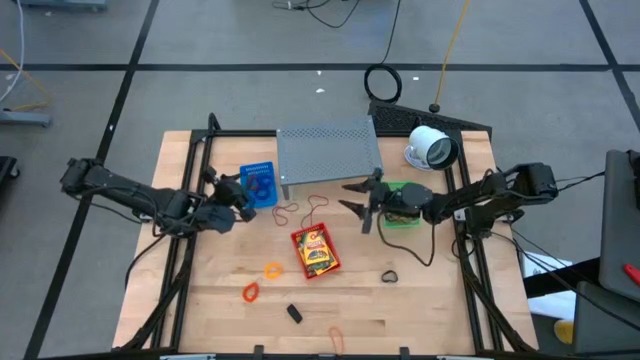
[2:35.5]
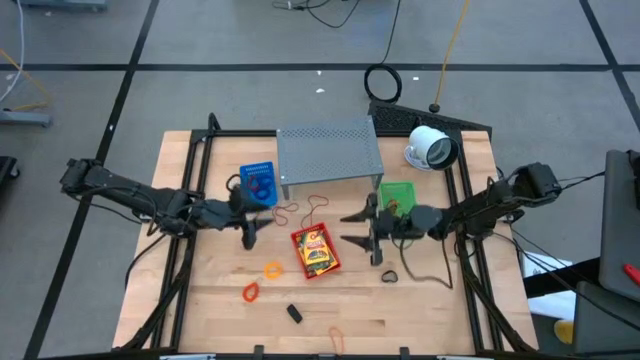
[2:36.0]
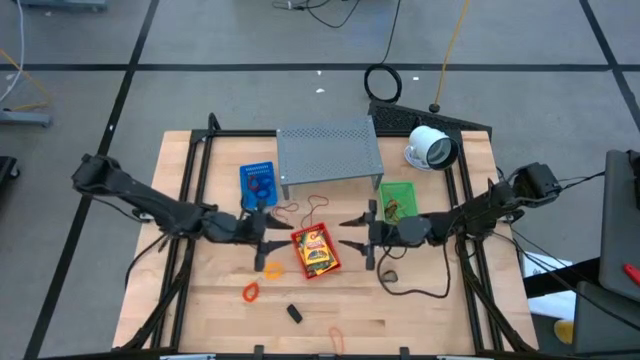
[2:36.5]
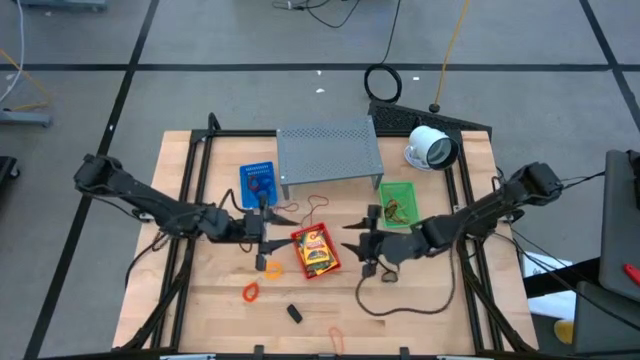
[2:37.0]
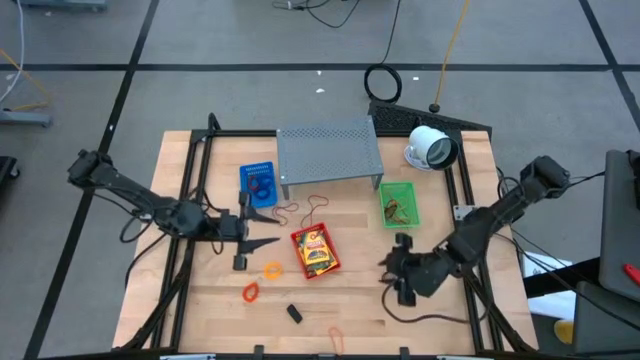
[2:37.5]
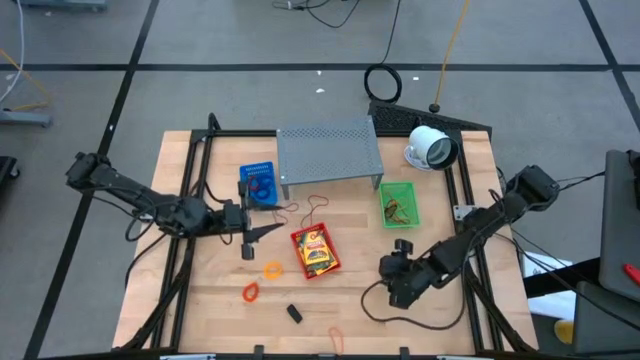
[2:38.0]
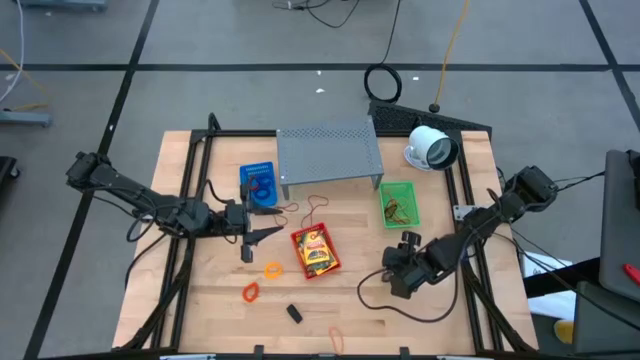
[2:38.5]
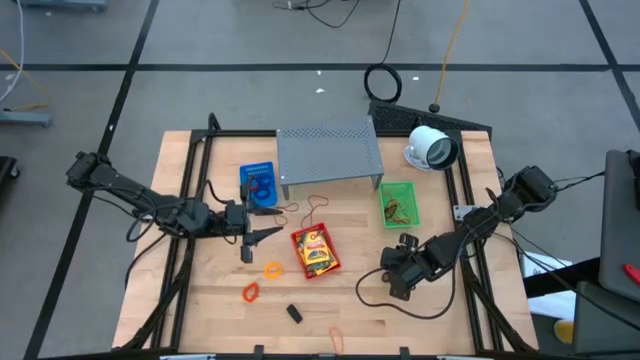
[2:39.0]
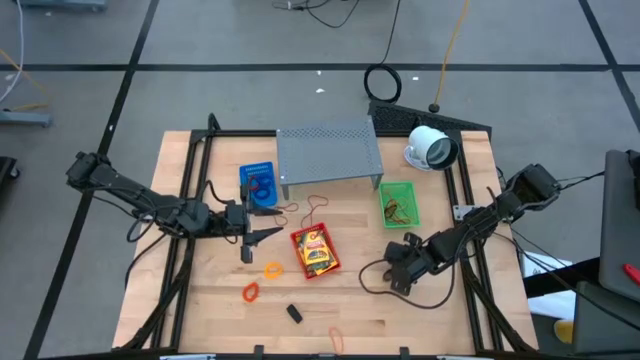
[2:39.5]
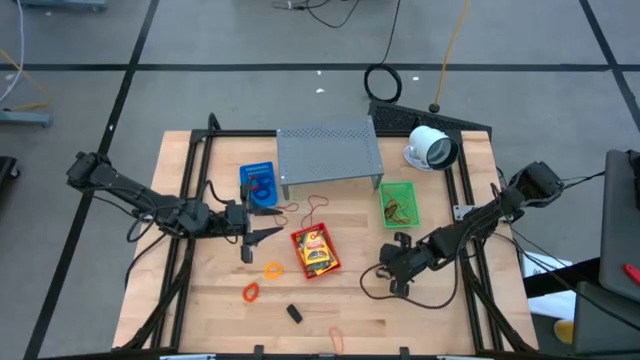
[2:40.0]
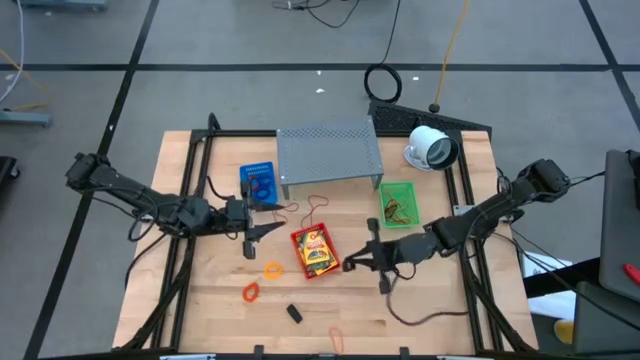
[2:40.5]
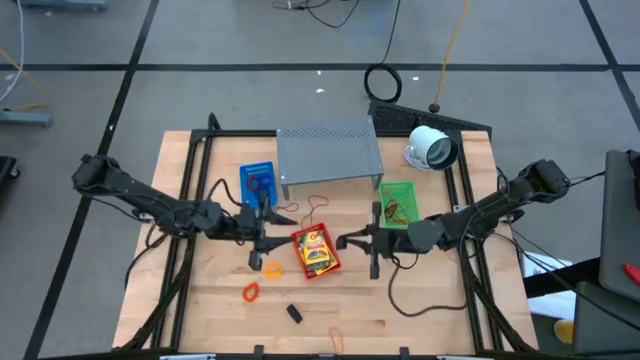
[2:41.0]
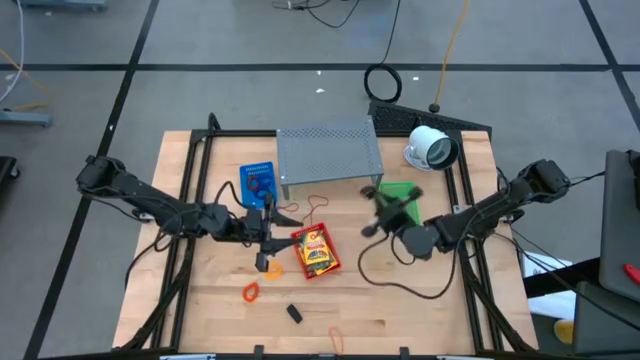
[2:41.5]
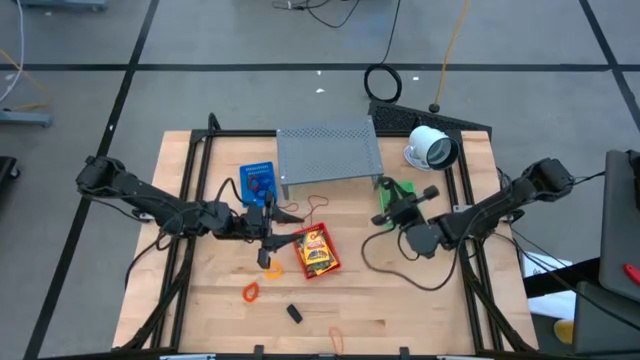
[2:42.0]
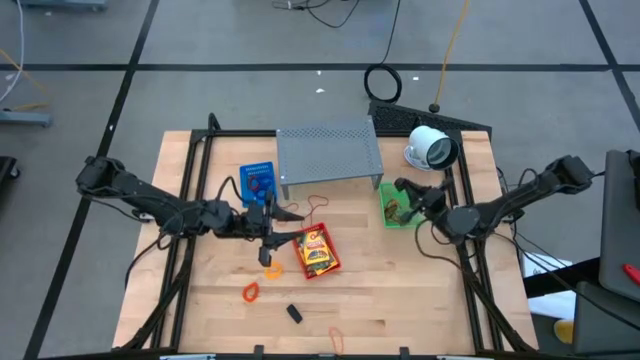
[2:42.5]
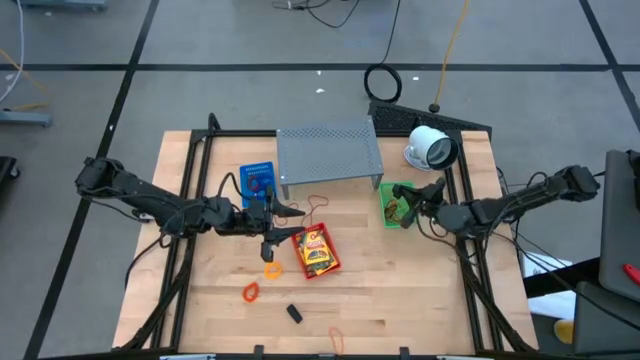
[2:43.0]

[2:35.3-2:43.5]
Task: Pick & Place Office Desk Supplies
Put the right black rubber band into the green bin

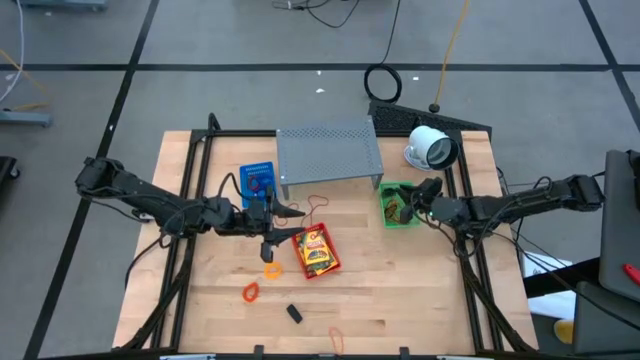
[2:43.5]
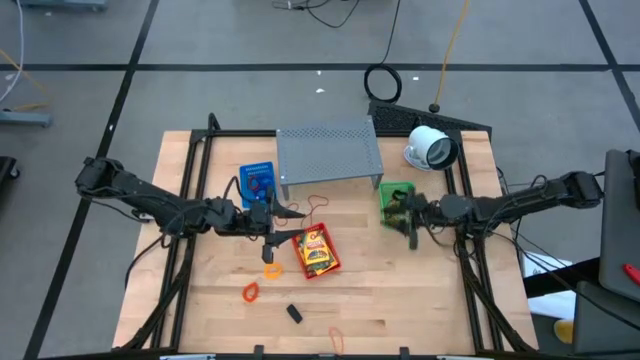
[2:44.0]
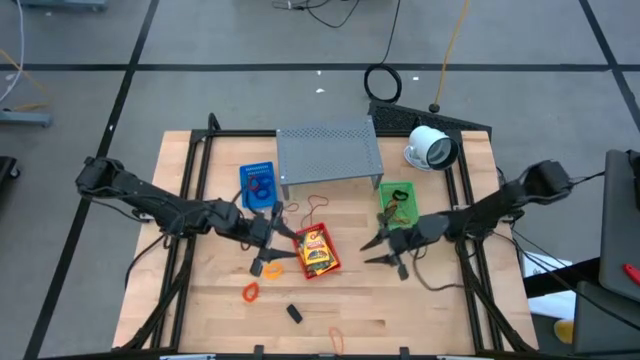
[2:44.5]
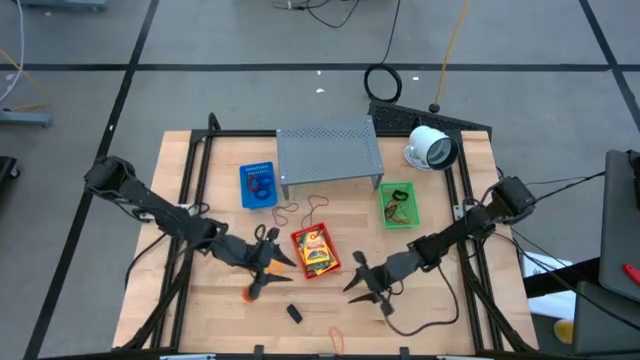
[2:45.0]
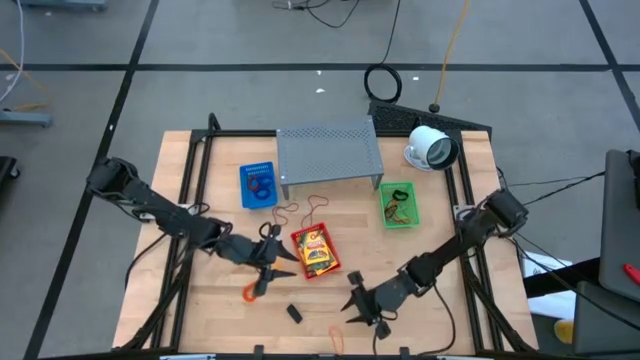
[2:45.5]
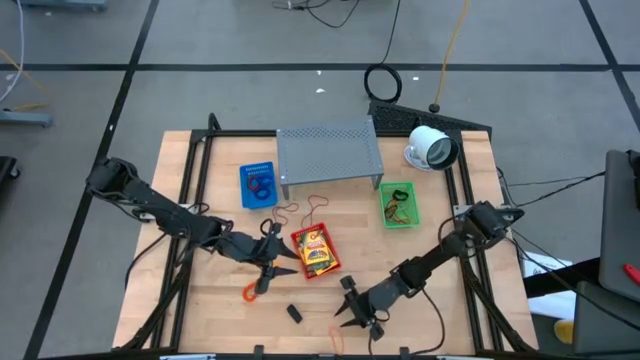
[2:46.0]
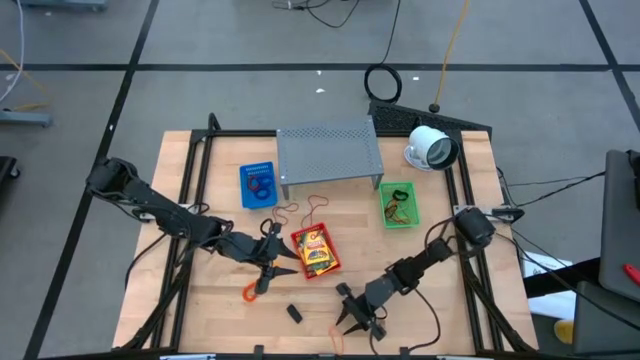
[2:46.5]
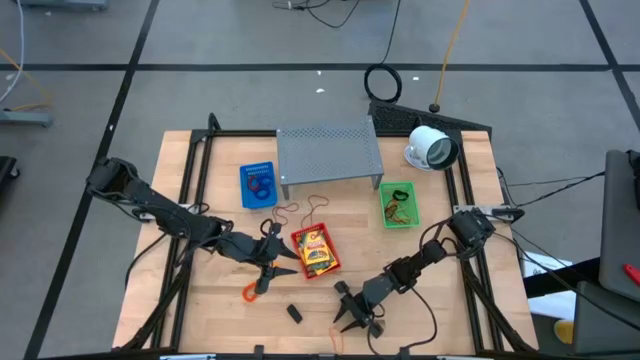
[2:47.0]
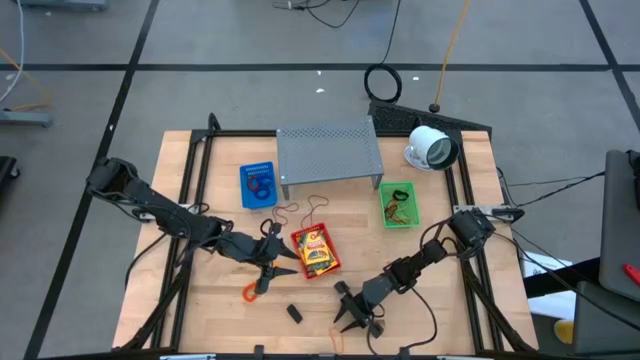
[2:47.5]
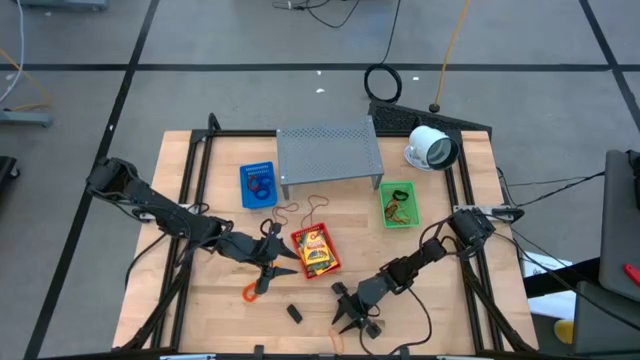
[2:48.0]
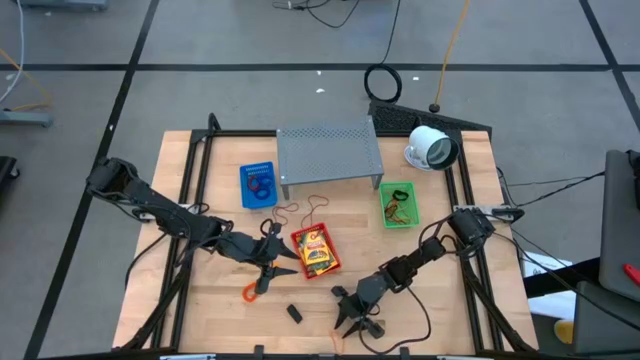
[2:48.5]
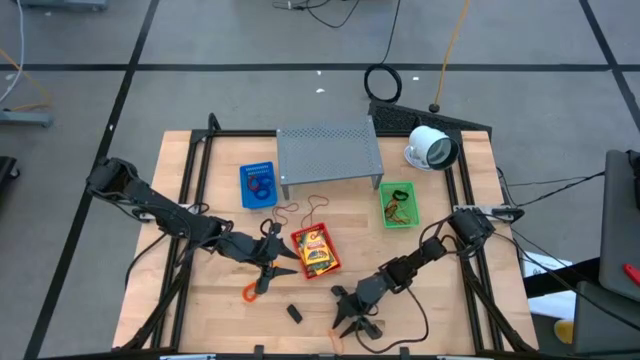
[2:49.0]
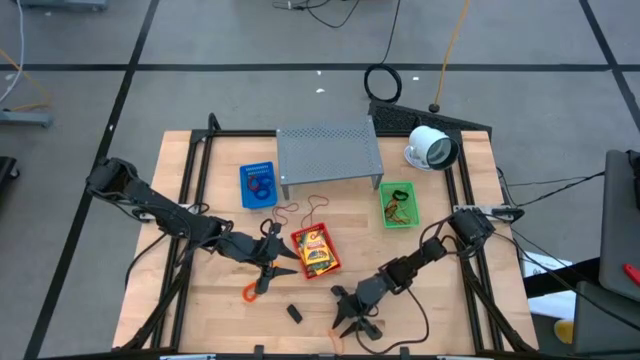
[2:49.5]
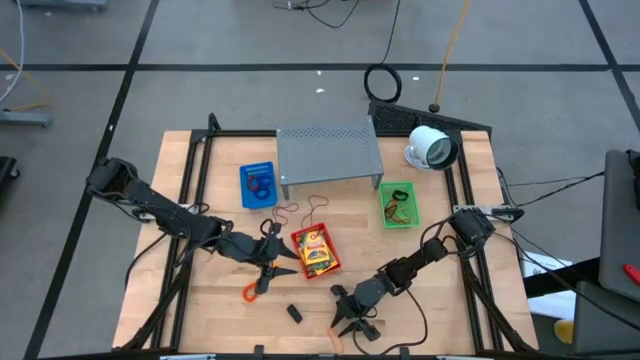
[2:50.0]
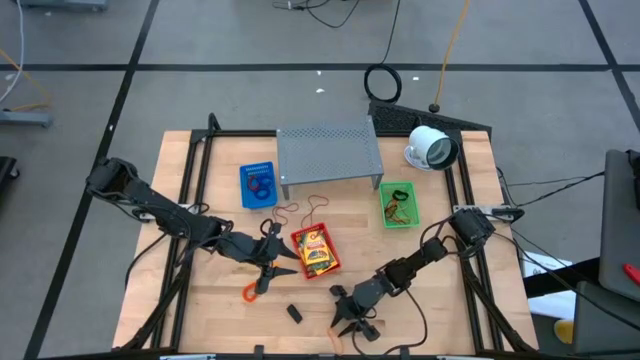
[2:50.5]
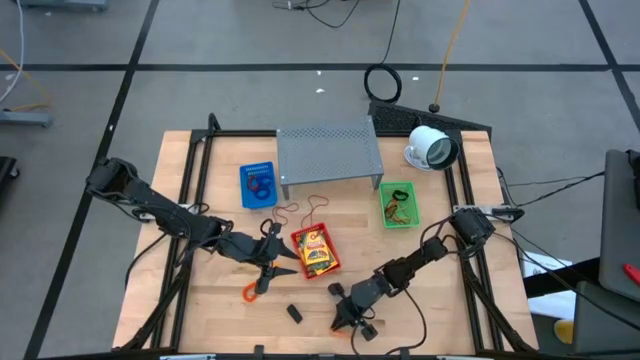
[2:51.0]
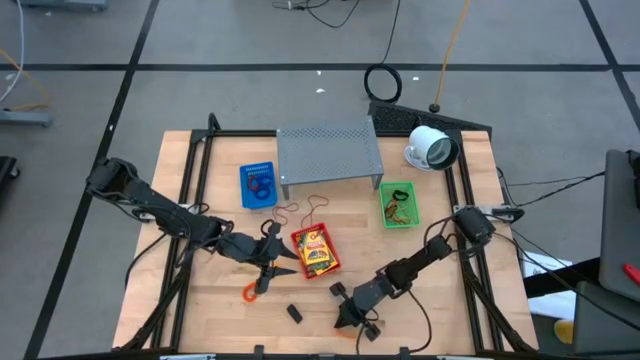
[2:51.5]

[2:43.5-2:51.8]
Put the orange rubber band into the green bin

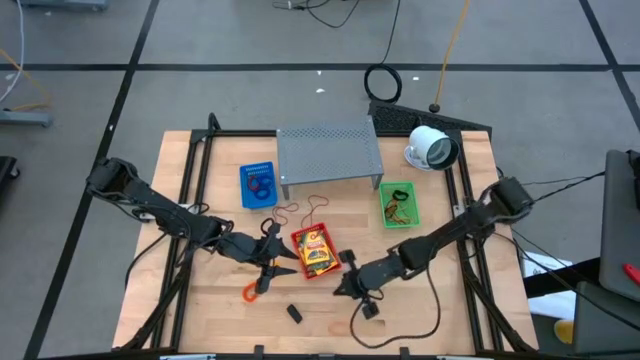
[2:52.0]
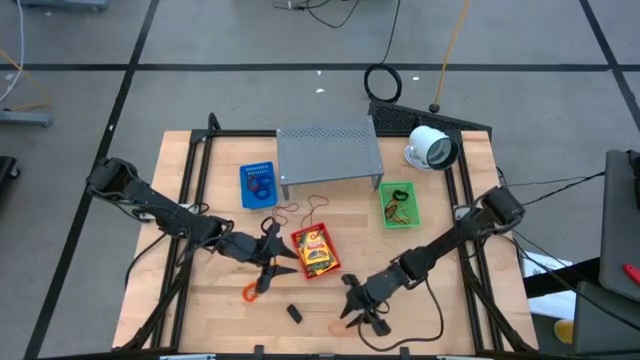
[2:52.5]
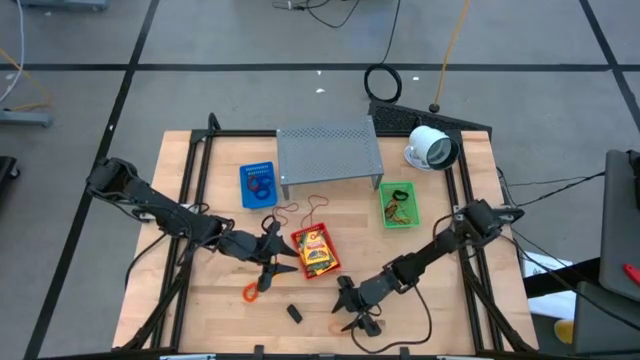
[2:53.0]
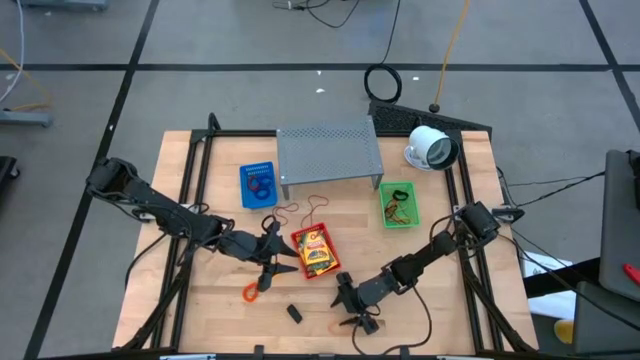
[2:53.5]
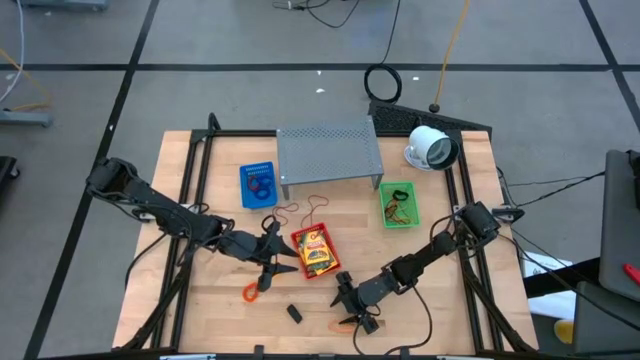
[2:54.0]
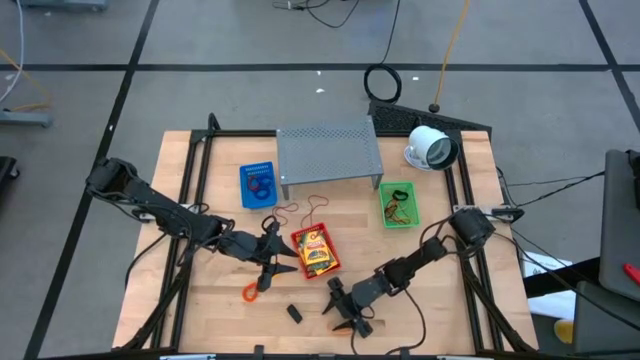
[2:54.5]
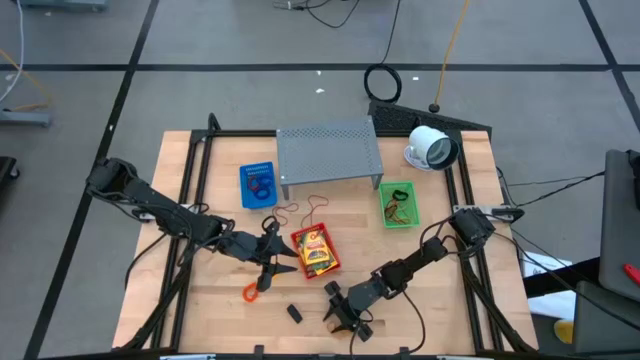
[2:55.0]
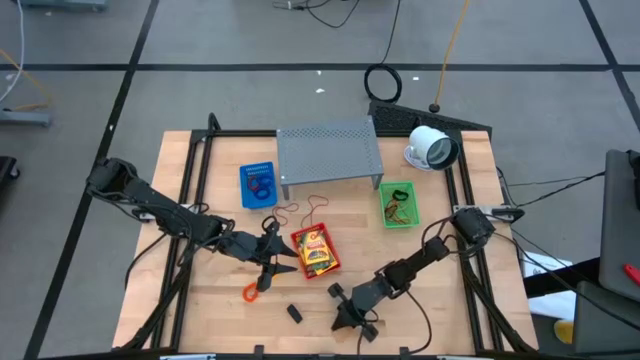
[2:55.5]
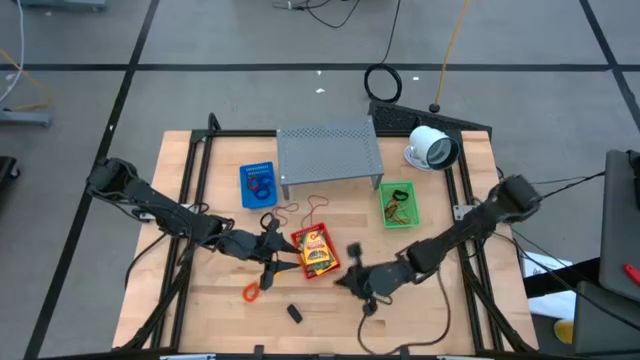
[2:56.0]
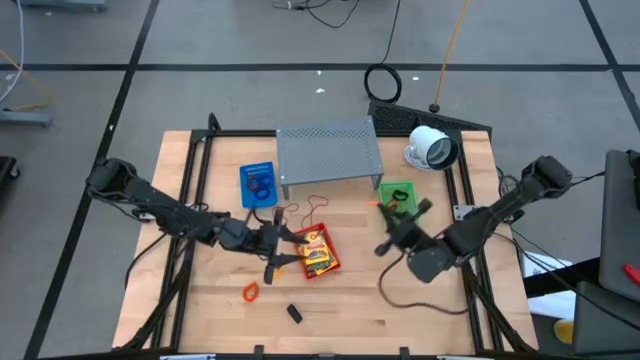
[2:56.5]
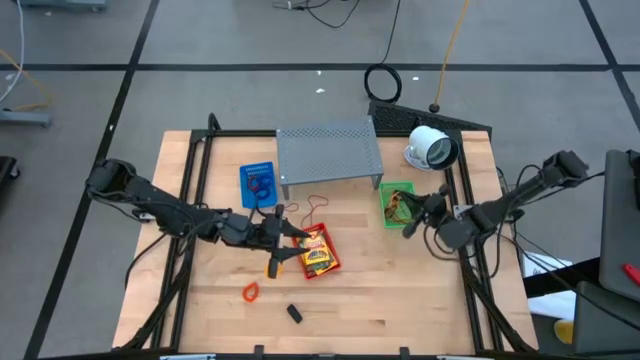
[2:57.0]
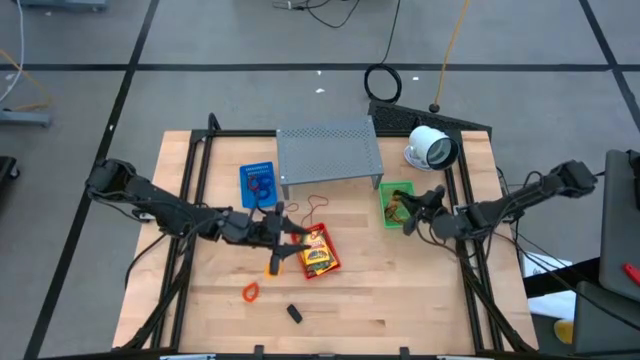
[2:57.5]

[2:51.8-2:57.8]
Put the orange rubber band into the green bin
